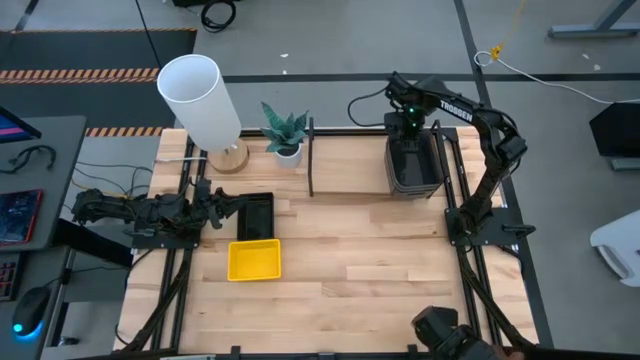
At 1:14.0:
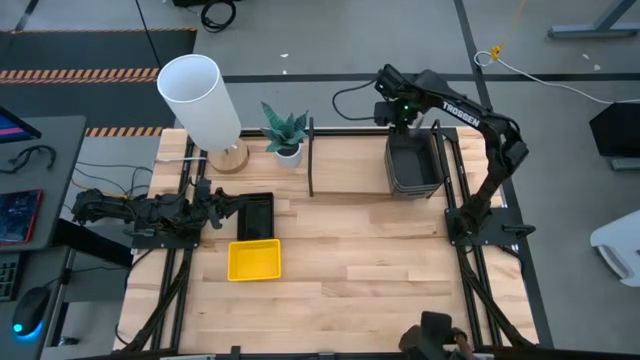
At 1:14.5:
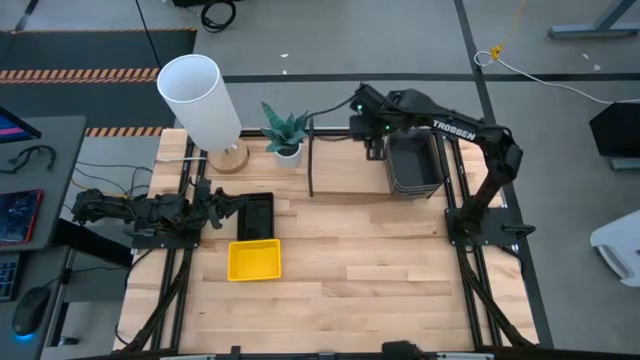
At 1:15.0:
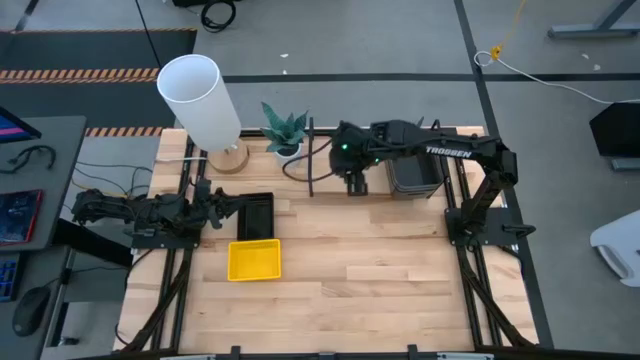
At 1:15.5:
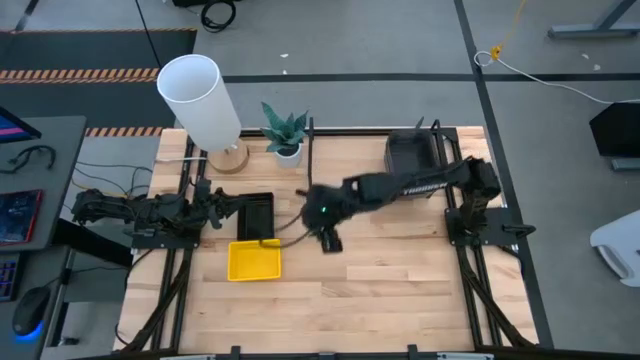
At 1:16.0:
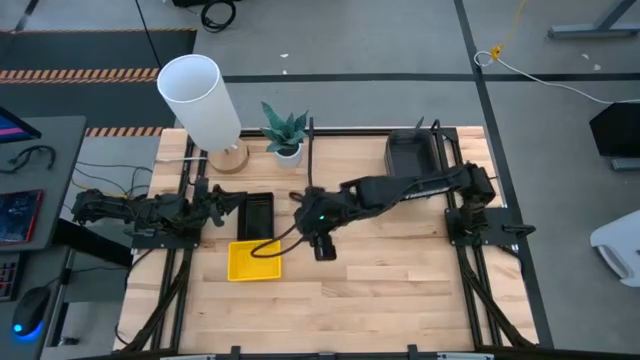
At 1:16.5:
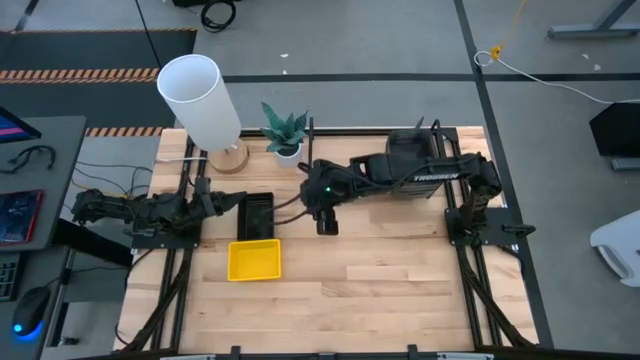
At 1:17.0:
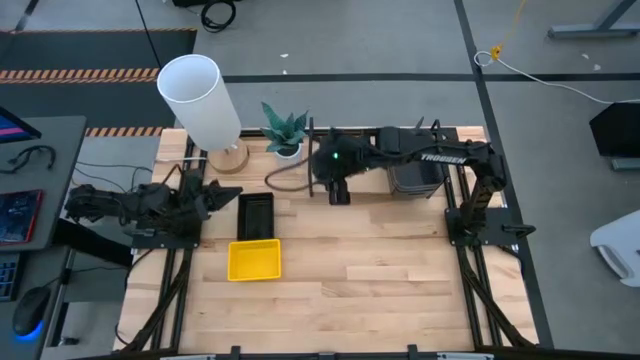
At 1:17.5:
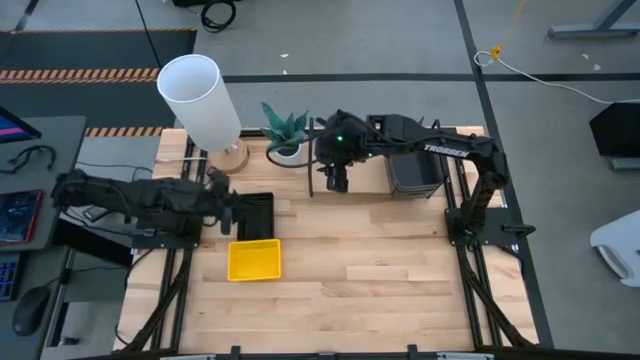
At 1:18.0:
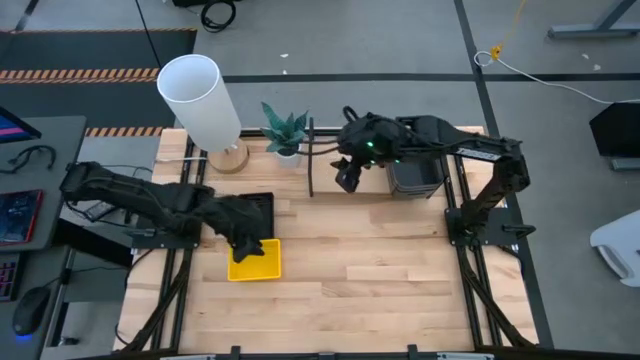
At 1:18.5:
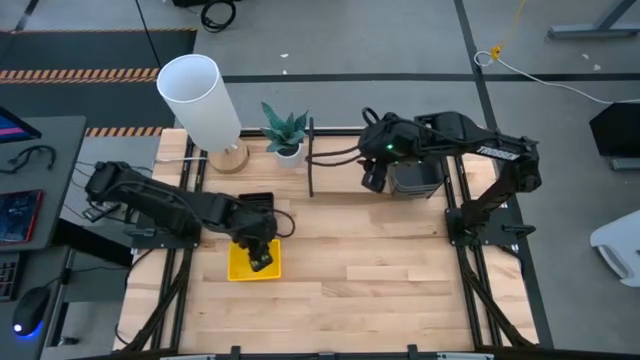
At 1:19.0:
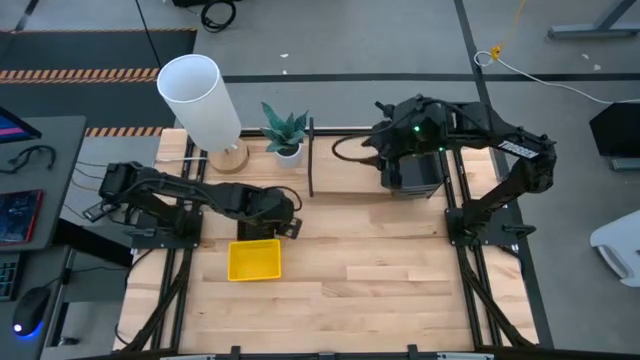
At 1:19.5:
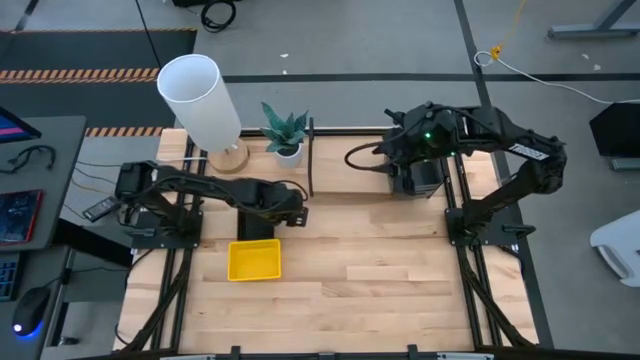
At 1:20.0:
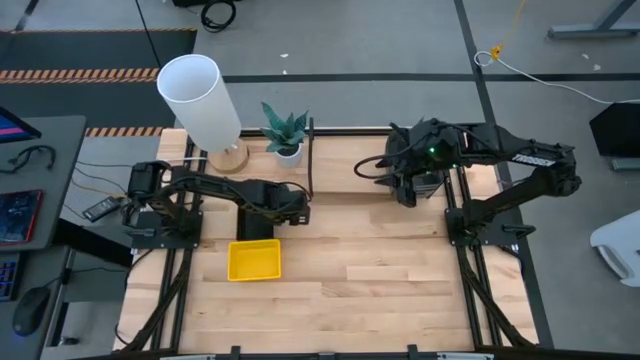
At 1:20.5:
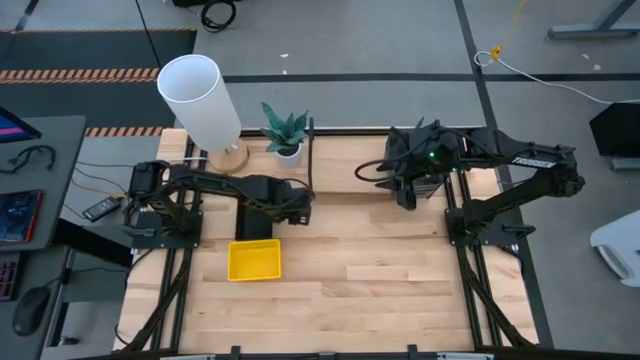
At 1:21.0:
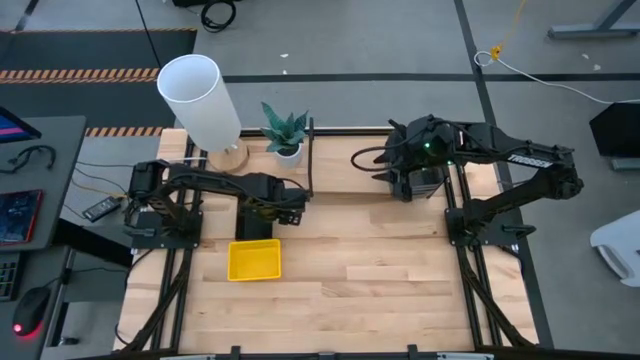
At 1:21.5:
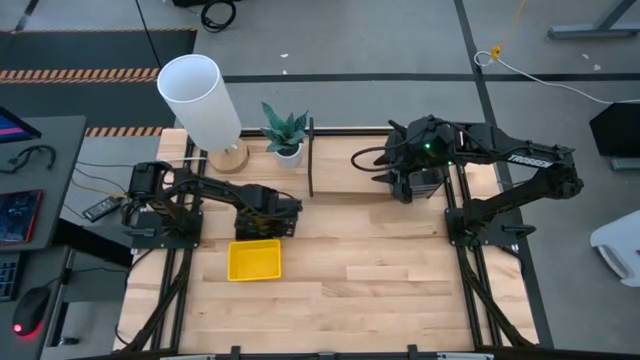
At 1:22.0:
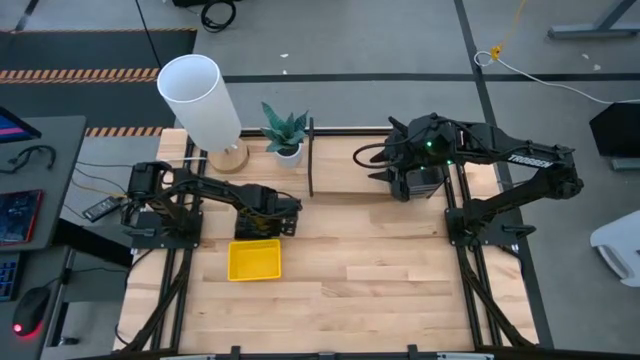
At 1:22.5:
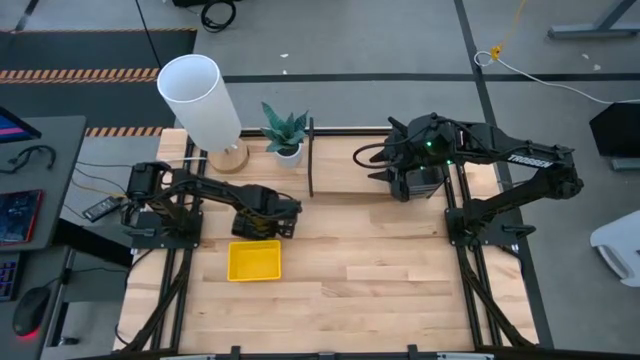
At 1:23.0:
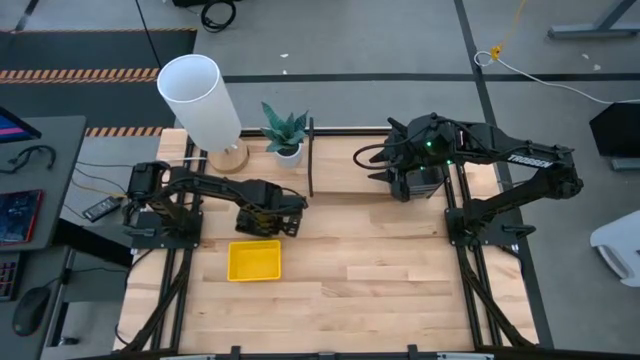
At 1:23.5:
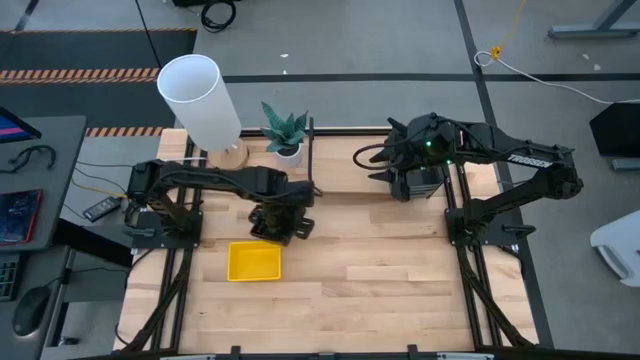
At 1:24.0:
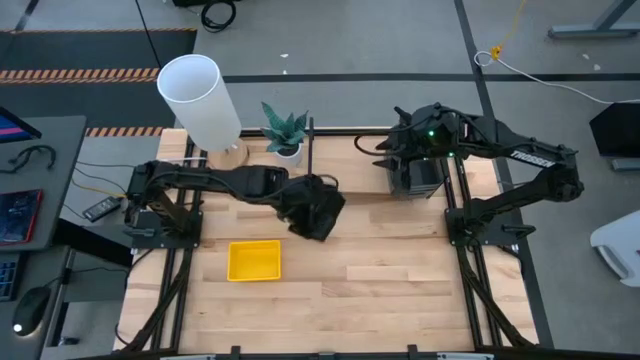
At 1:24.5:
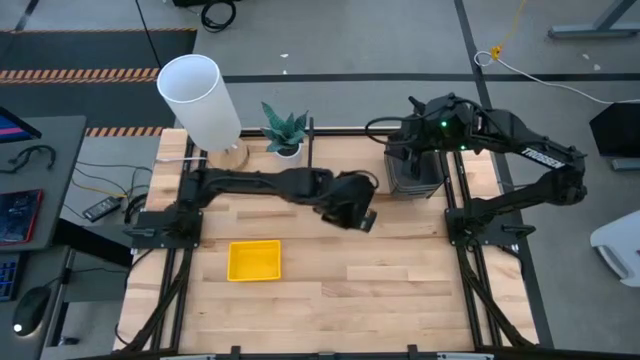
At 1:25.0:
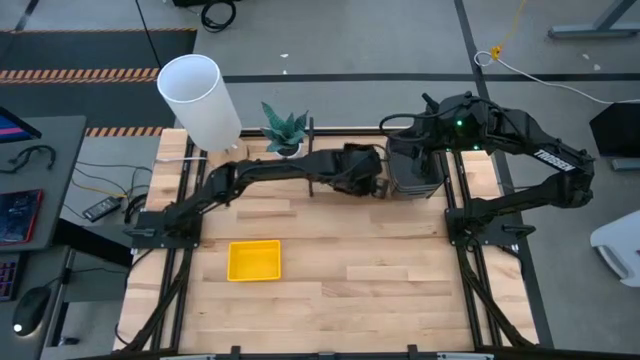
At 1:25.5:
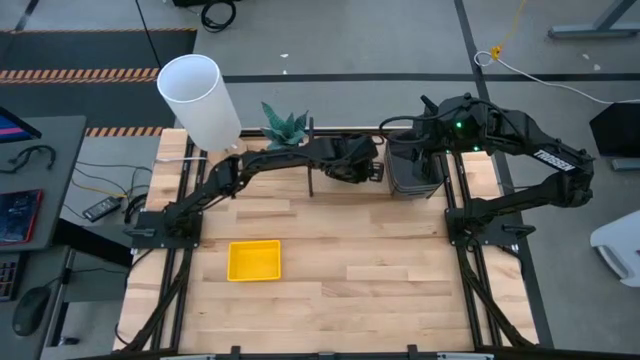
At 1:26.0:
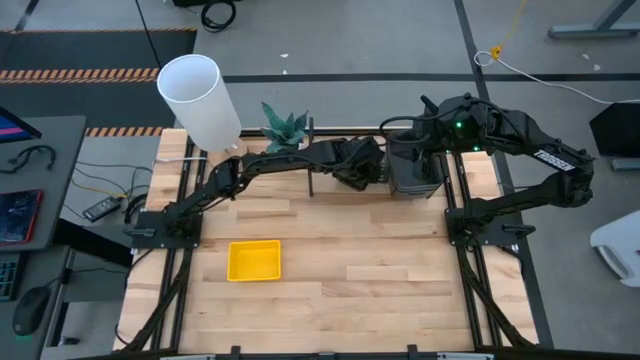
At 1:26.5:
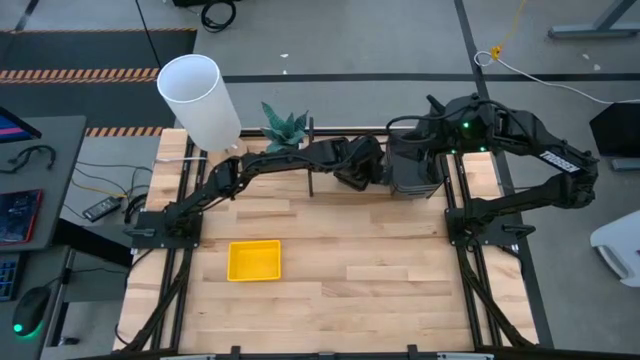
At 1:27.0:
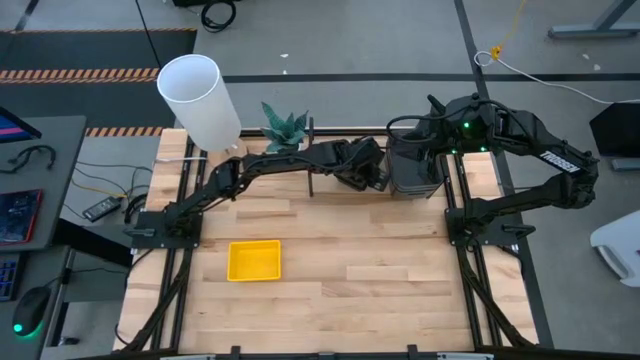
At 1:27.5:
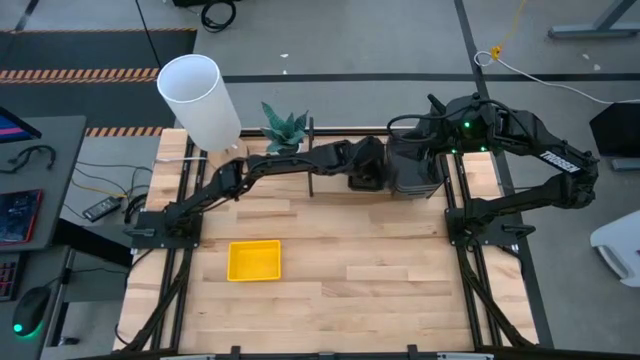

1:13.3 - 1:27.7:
Task: Stack baskets on shelf by color
Put the stacked black bins on the shelf

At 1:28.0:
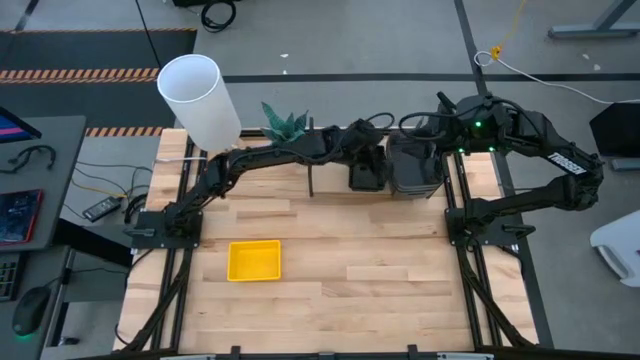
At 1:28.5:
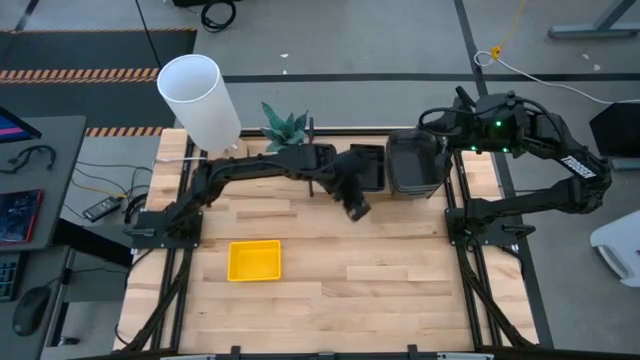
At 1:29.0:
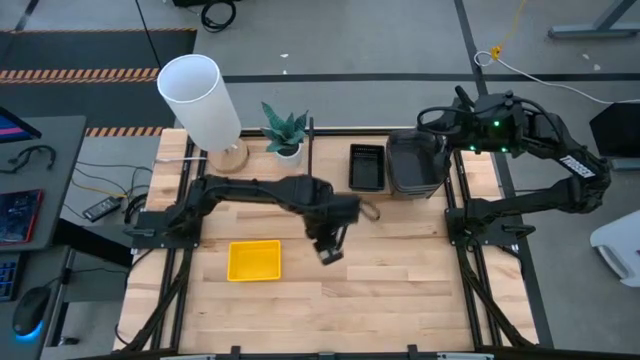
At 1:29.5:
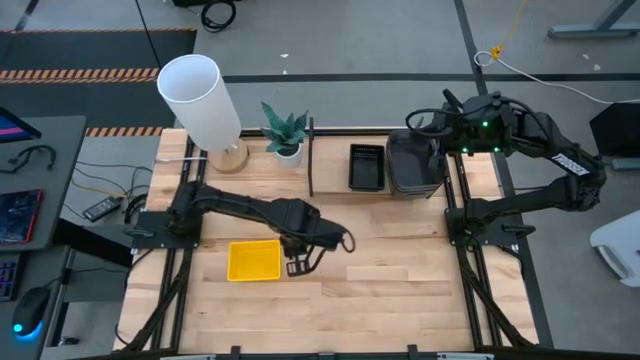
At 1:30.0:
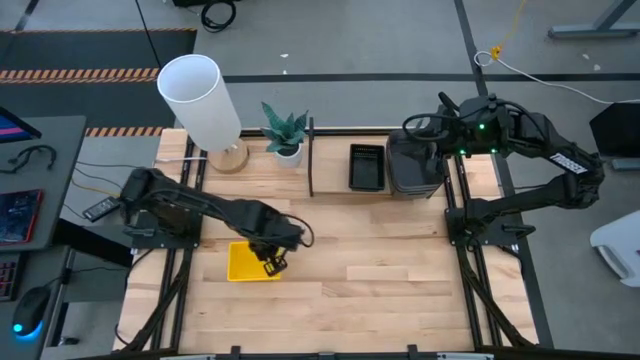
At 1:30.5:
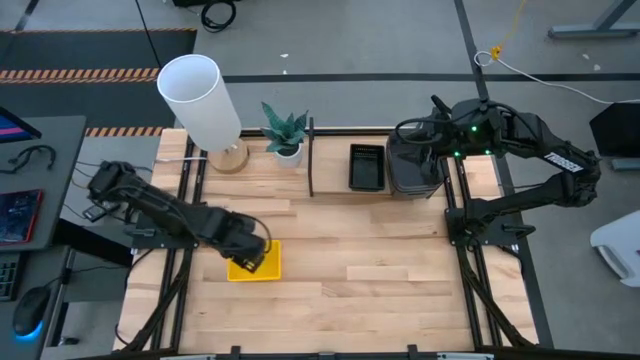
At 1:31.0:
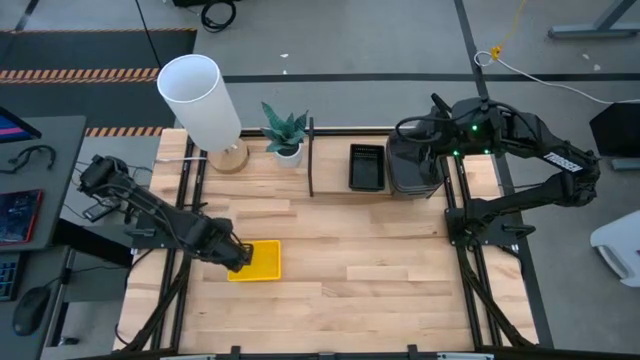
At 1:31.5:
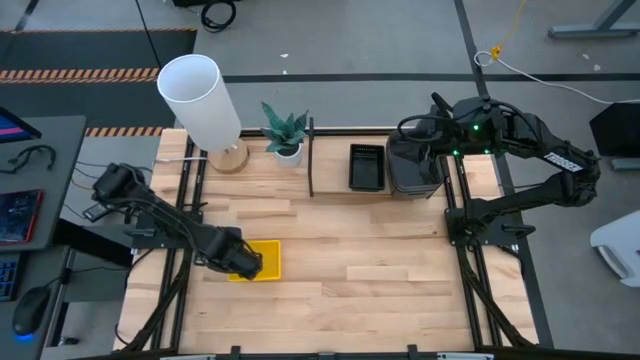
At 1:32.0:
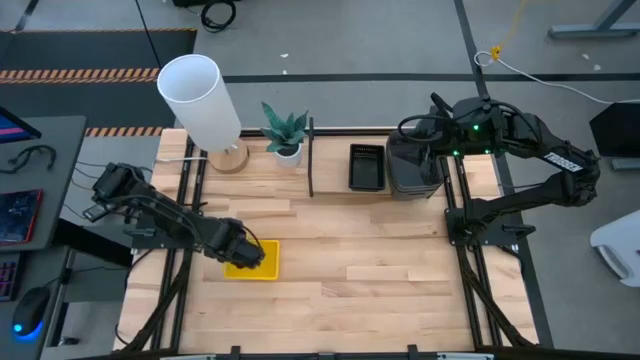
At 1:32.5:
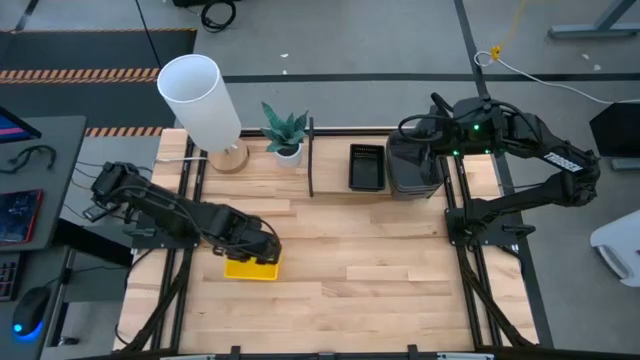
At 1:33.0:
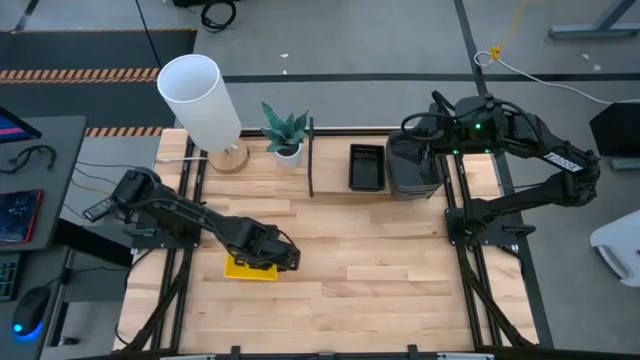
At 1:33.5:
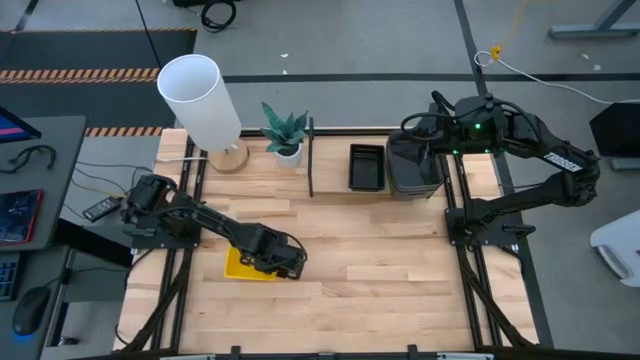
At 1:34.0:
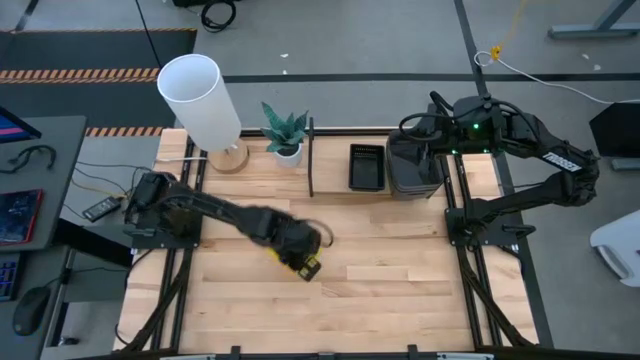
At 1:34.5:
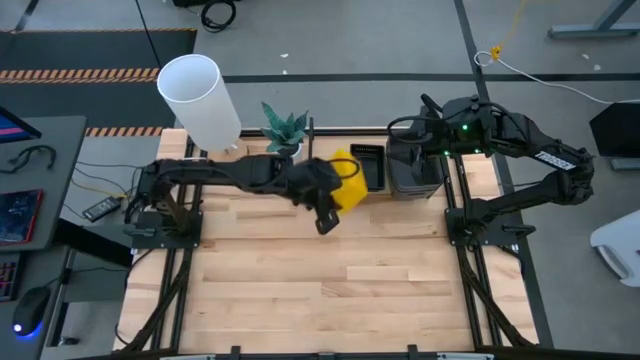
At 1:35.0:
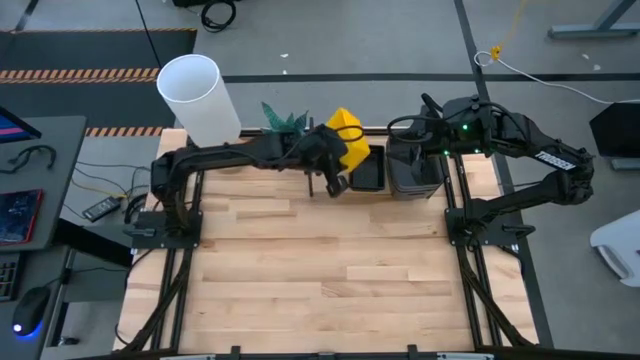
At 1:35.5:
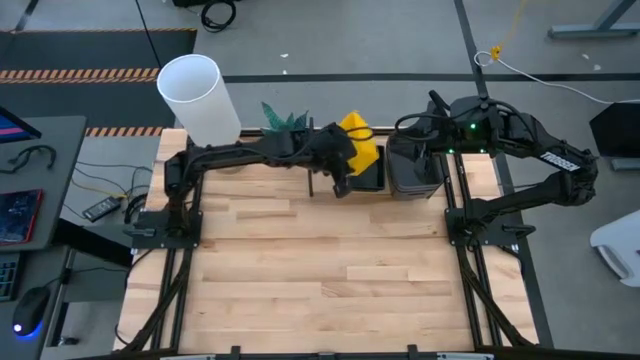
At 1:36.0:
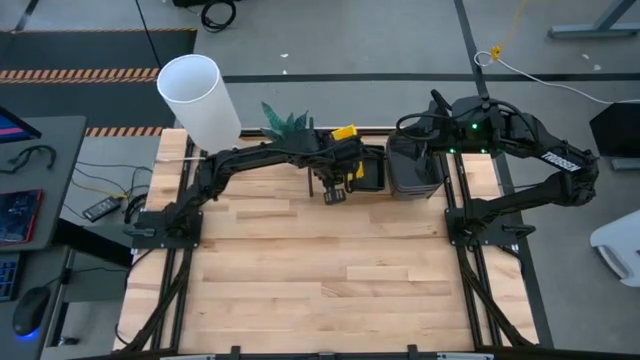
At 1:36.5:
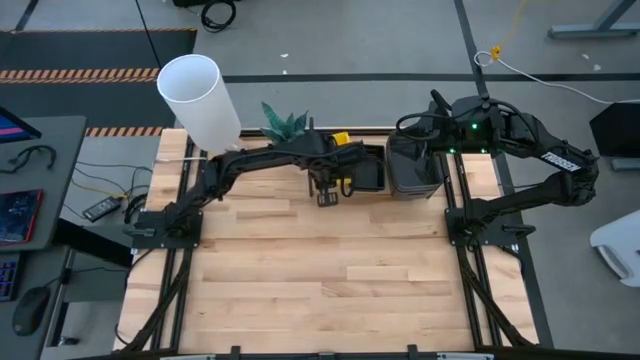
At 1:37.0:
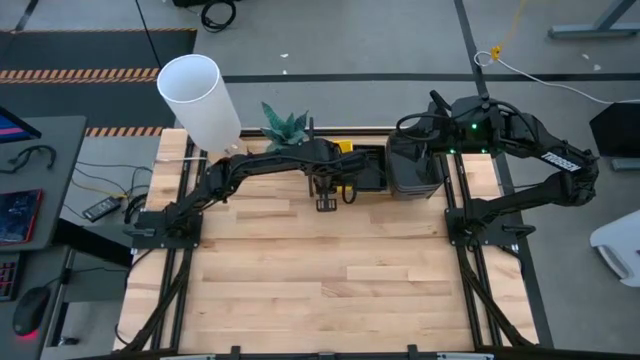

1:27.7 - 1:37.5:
Put the stacked yellow bins on the shelf
